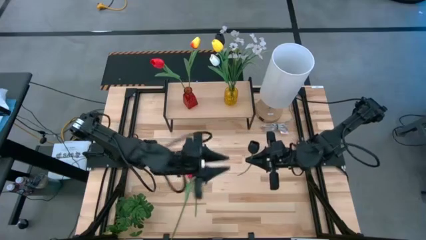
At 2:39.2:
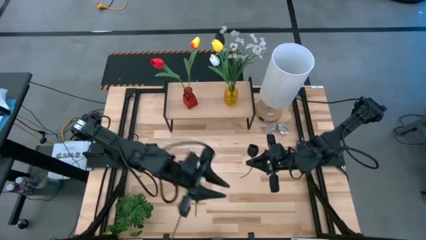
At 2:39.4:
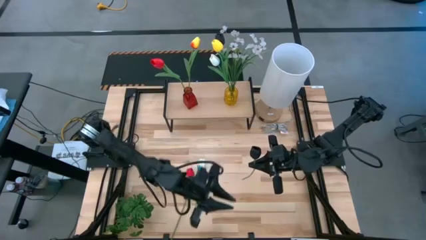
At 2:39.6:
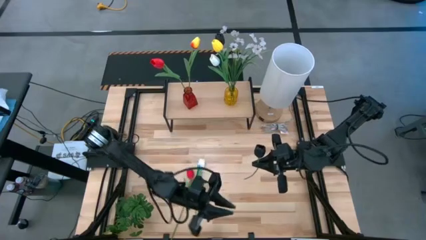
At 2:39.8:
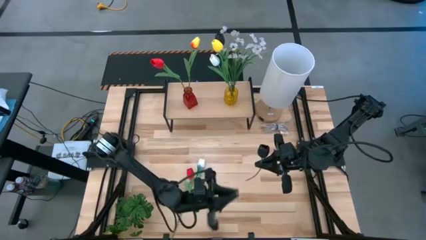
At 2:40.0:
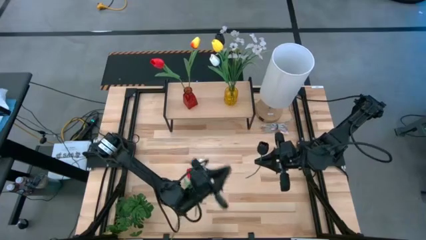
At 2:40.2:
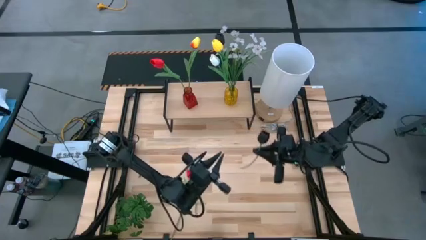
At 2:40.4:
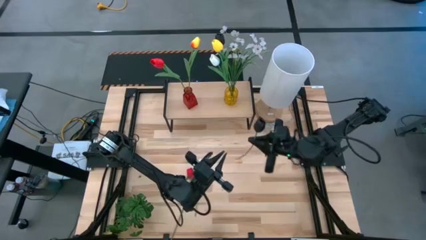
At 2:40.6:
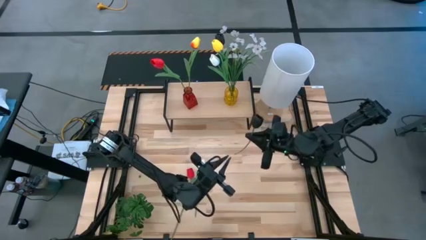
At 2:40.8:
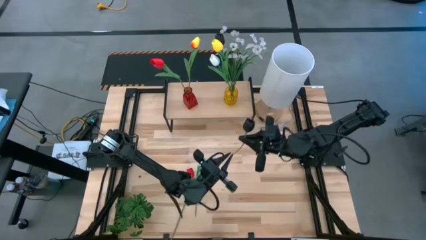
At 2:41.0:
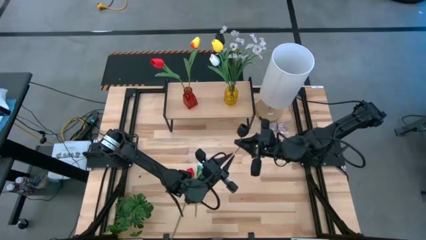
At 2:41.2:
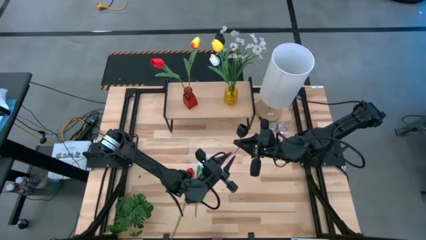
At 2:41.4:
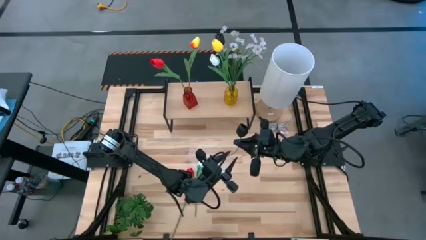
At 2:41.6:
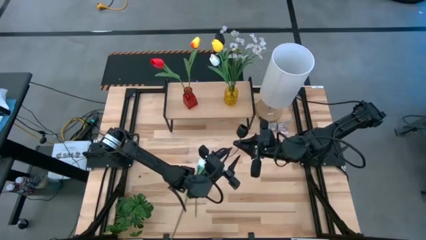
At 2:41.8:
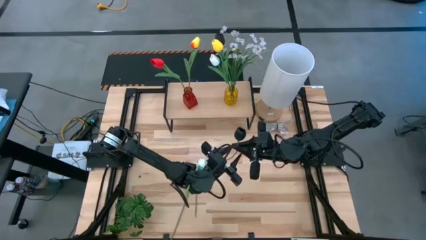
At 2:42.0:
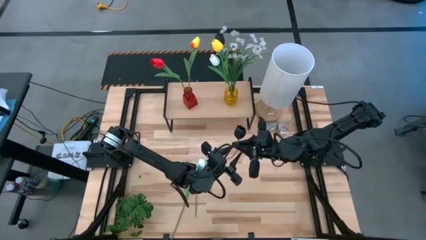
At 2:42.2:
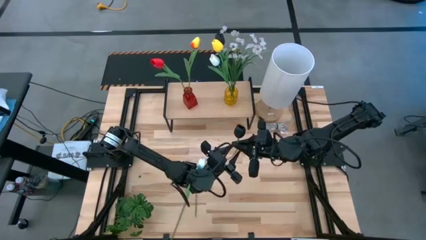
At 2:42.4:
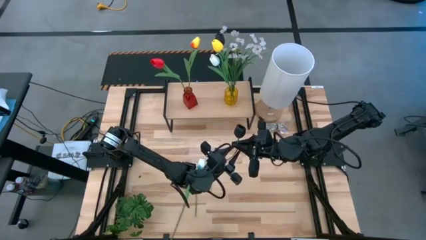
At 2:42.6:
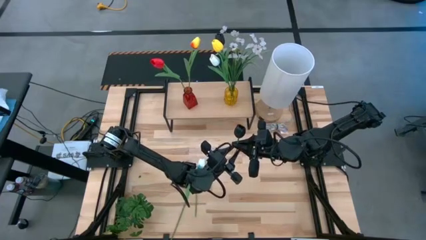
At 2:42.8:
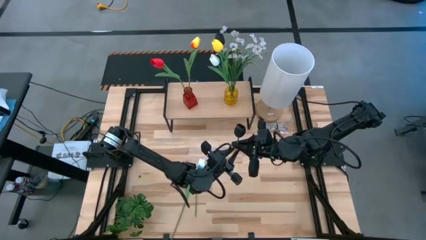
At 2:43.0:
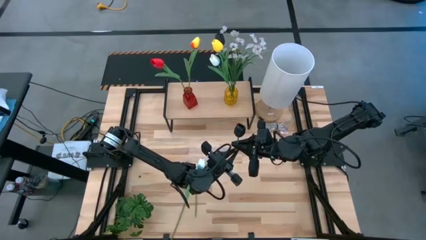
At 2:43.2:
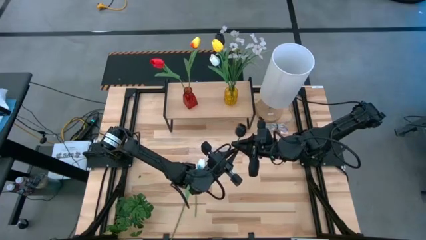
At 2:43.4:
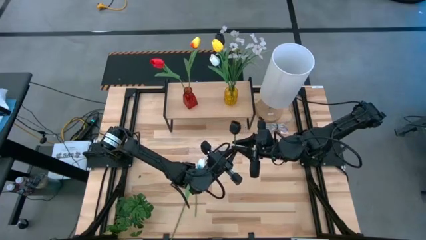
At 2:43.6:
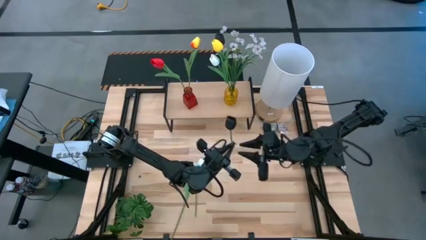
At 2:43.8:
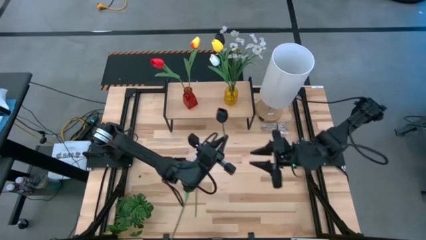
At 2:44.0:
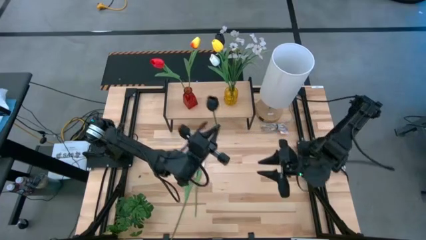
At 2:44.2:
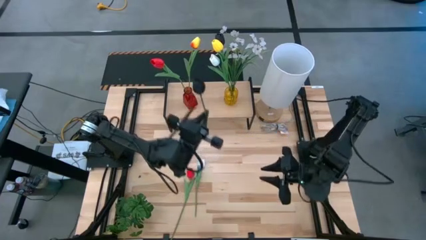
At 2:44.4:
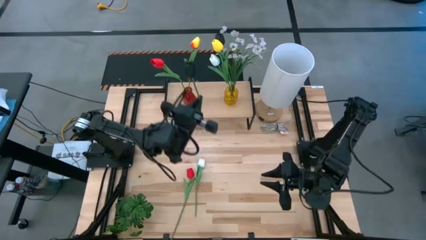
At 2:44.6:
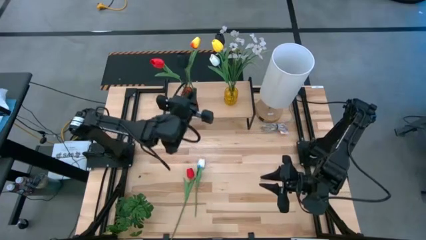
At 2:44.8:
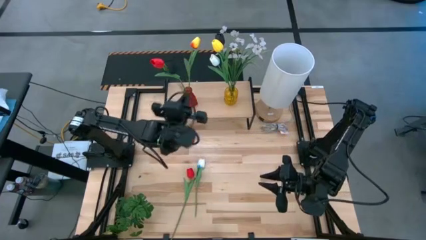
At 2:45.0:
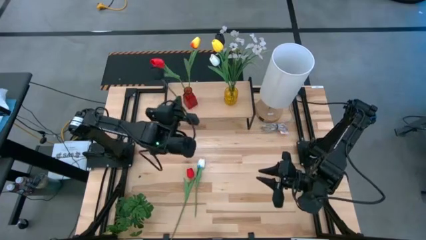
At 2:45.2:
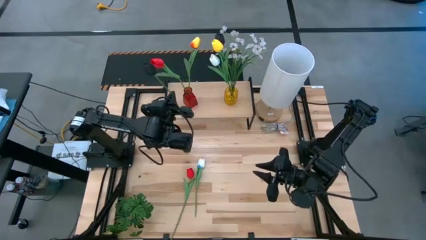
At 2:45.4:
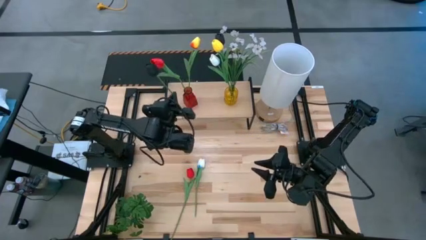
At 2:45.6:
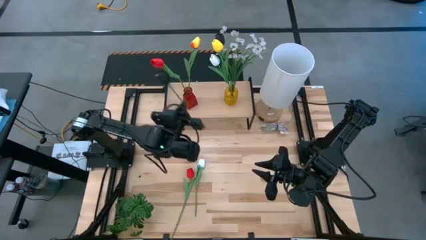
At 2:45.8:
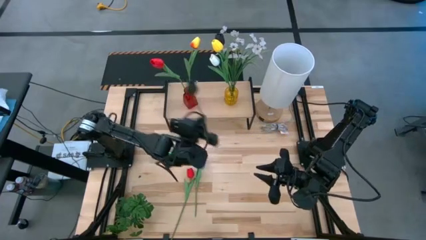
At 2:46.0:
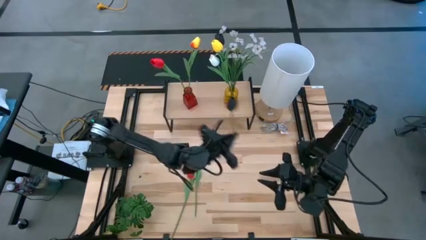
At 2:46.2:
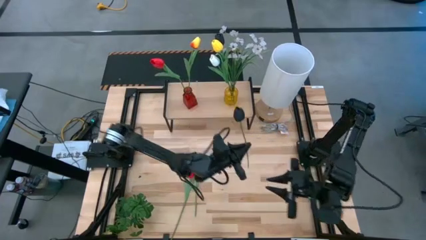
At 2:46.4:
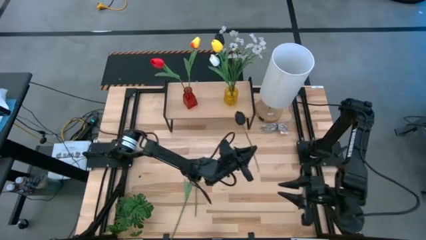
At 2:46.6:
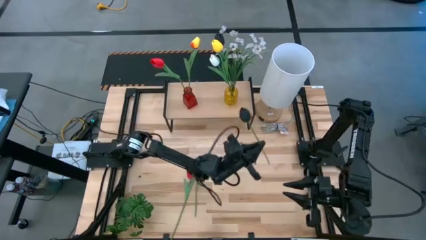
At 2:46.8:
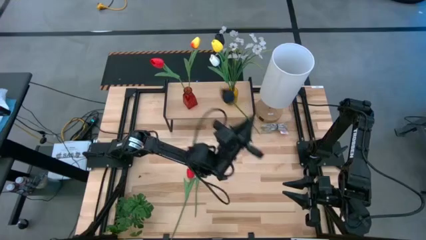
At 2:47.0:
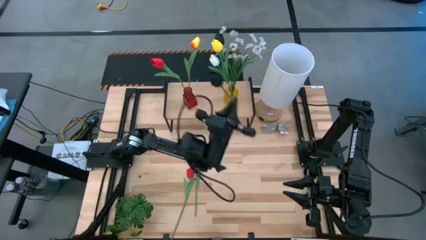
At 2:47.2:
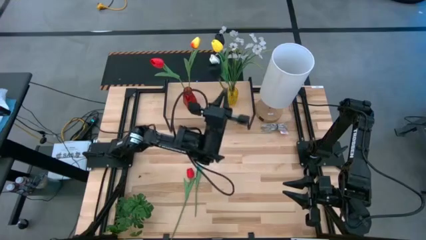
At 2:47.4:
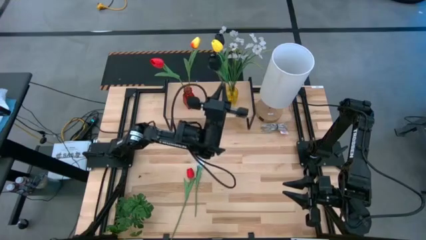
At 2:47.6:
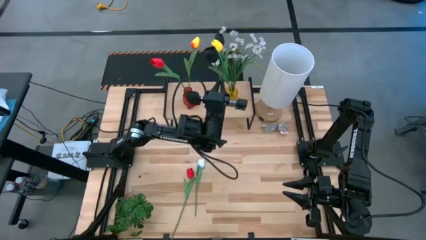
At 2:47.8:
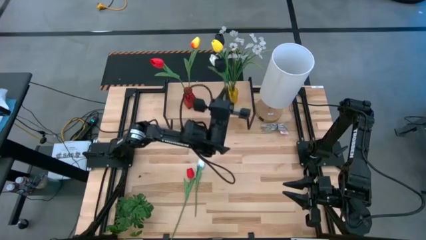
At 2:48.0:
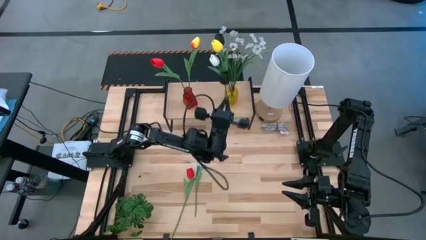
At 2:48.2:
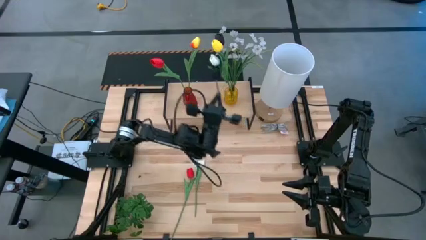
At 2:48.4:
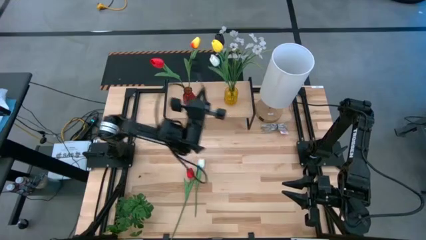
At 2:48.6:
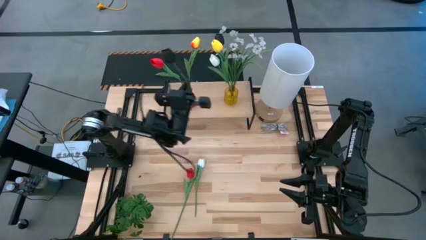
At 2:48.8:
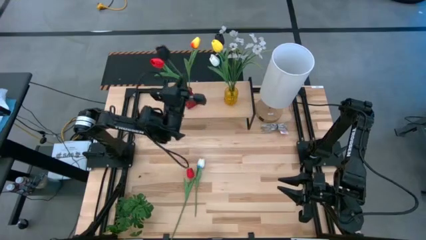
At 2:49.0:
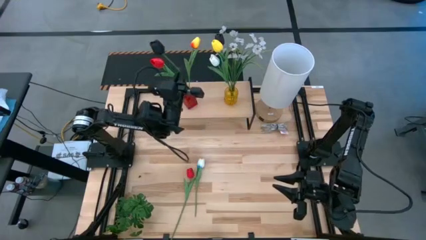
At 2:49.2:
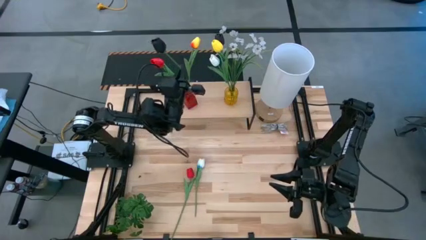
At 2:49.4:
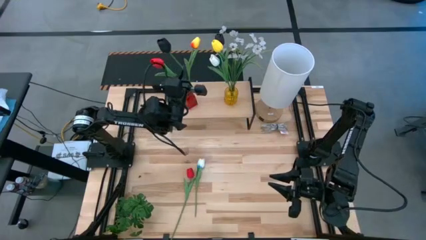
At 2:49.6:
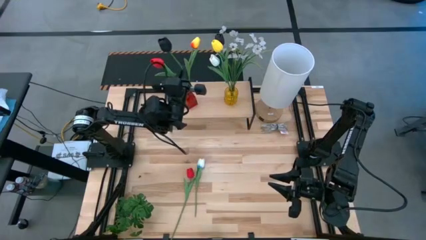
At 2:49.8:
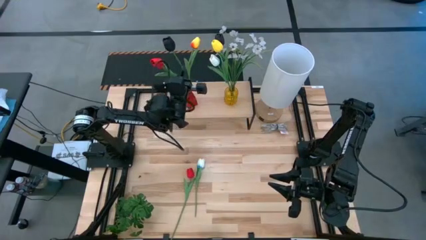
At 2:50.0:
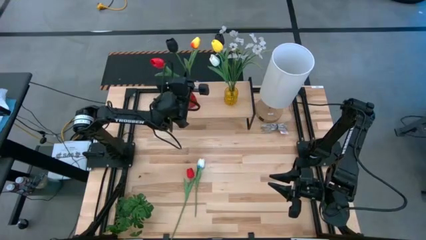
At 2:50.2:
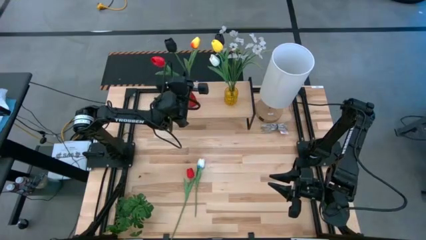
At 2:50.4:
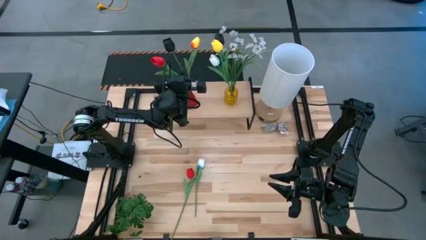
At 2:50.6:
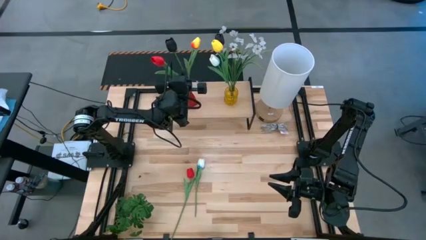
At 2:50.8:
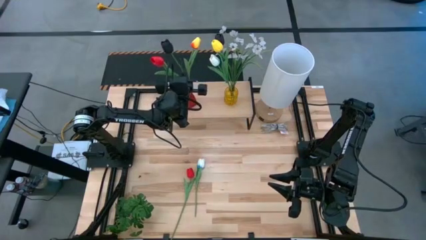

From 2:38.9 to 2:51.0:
Task: Pick and place flowers into a vace then onto a shelf
Put the black tulip into the red flower vase

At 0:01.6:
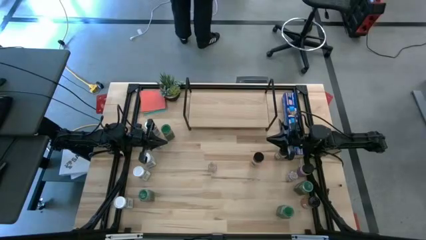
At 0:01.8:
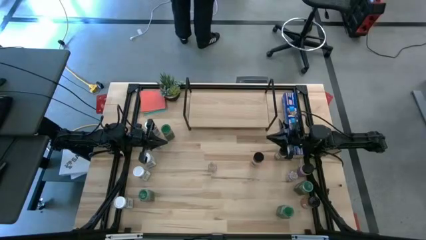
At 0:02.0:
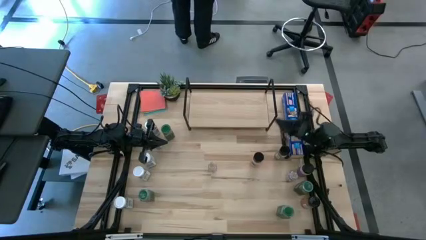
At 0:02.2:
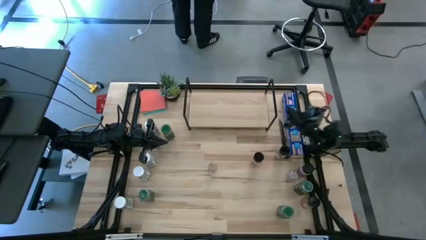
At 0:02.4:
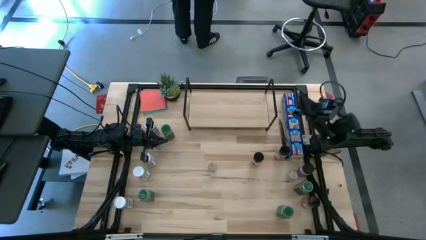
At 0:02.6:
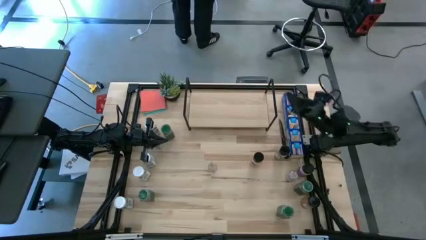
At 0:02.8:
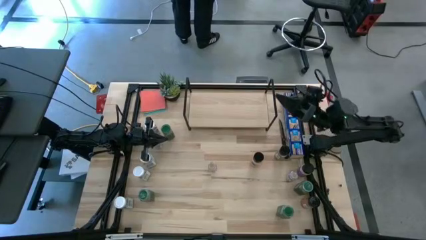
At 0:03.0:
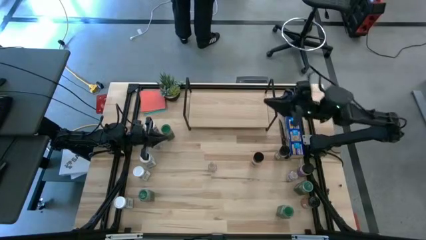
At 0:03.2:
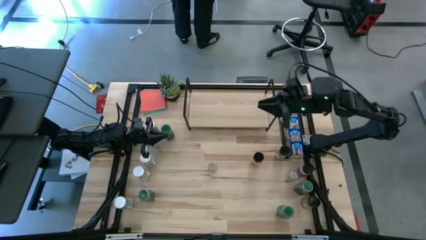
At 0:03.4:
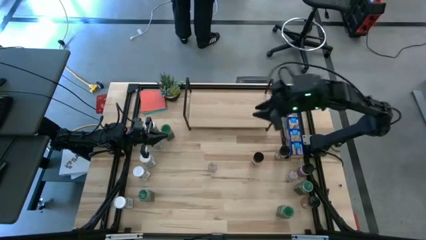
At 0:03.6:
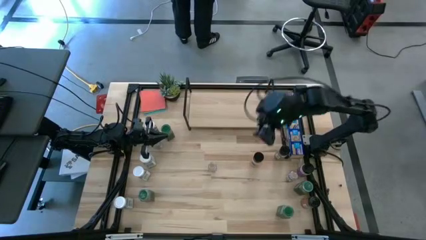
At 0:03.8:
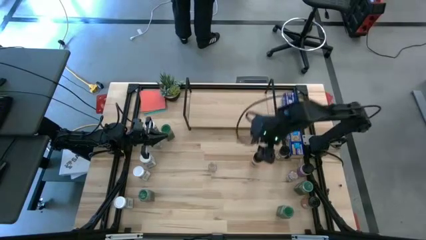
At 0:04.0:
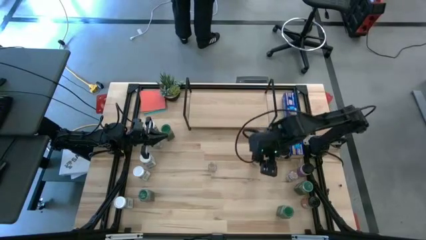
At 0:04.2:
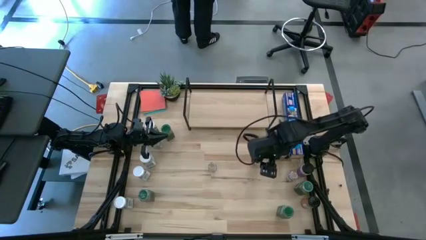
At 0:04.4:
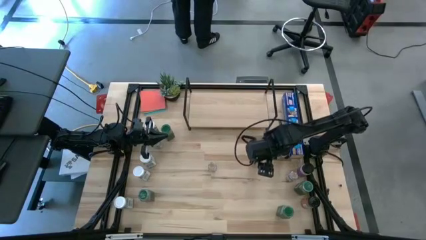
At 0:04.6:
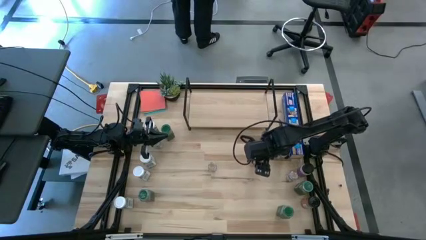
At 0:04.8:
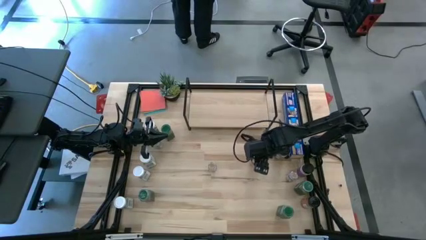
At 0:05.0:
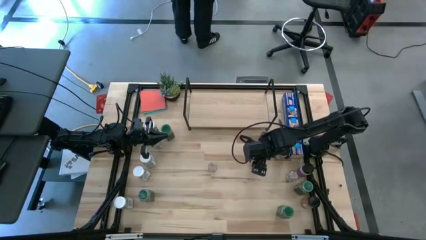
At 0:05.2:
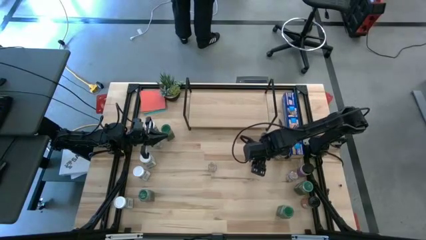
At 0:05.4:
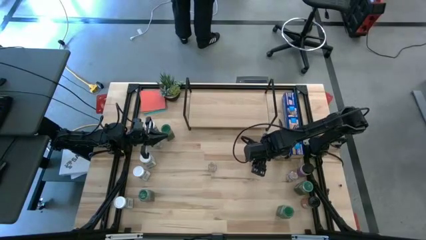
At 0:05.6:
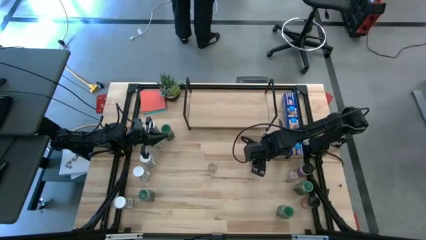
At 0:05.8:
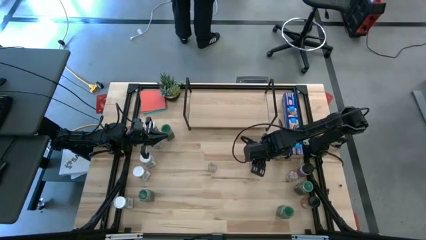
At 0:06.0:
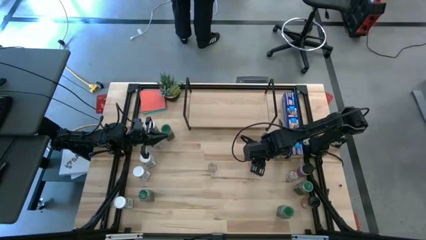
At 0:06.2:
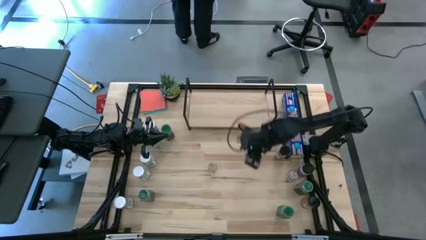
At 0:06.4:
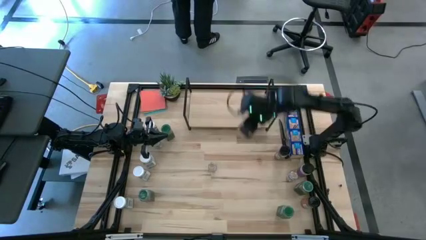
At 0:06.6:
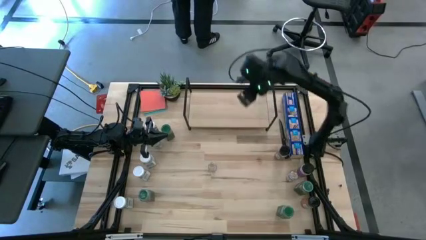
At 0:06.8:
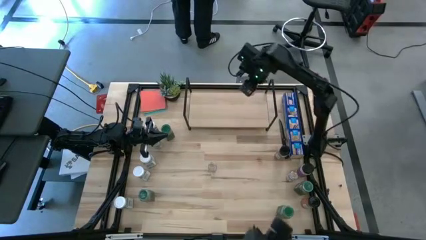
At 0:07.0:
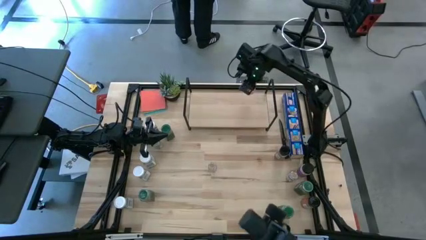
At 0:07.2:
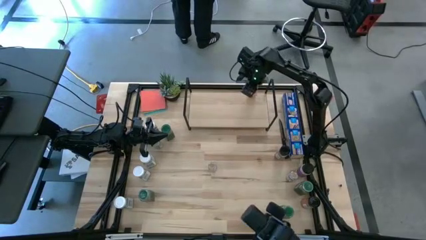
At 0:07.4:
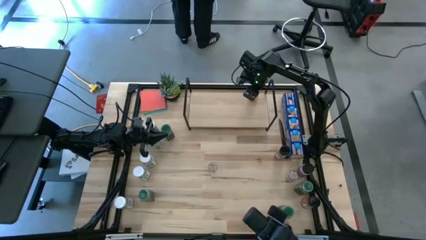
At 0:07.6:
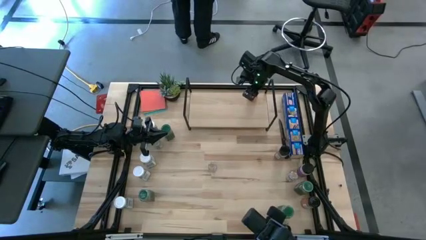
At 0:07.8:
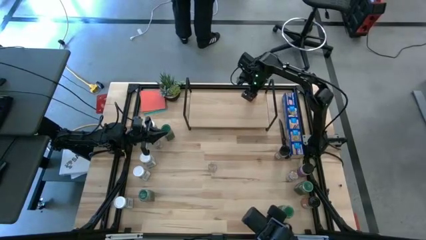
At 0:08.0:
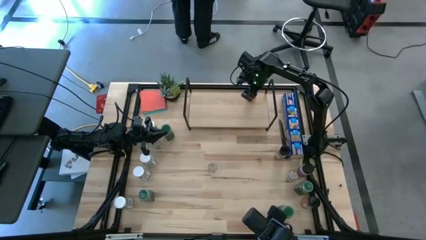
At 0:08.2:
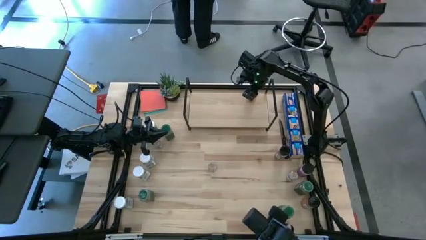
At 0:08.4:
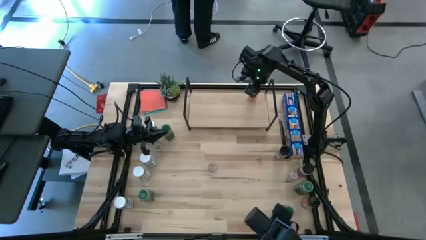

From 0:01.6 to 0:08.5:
Task: Shelf spices
Put the black-and-orange seasoning bottle on the shelf
